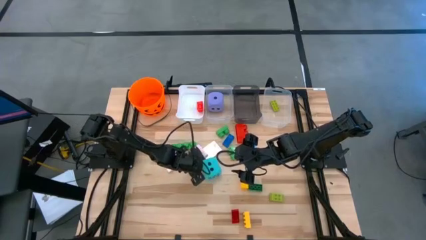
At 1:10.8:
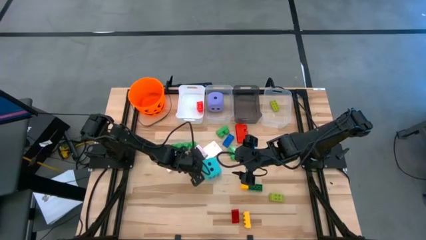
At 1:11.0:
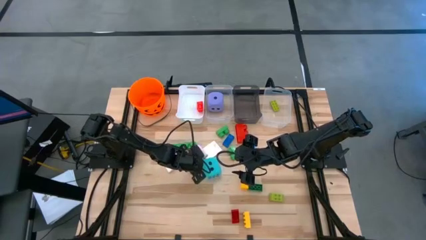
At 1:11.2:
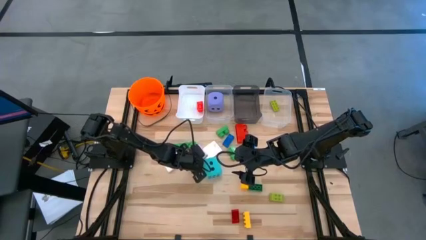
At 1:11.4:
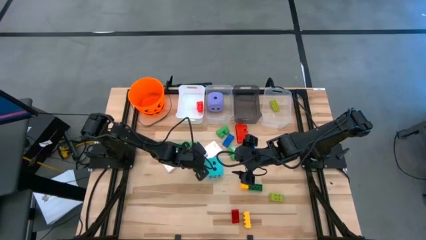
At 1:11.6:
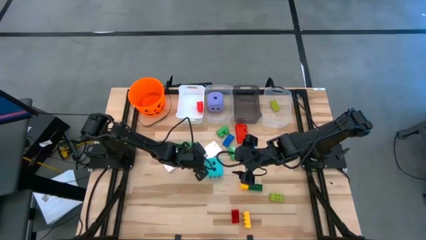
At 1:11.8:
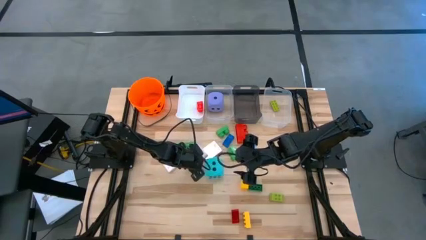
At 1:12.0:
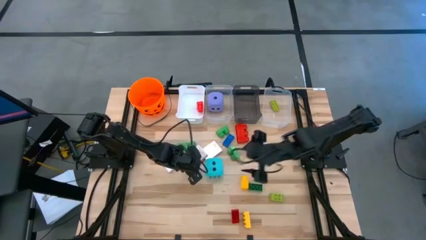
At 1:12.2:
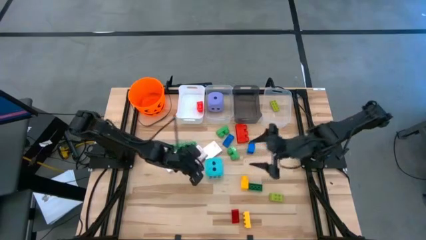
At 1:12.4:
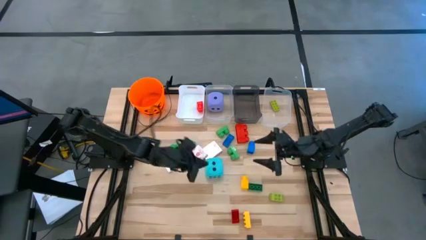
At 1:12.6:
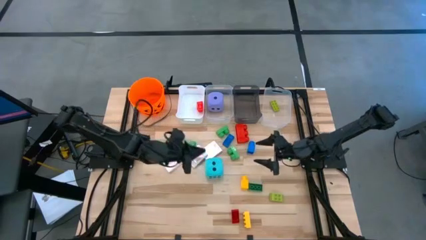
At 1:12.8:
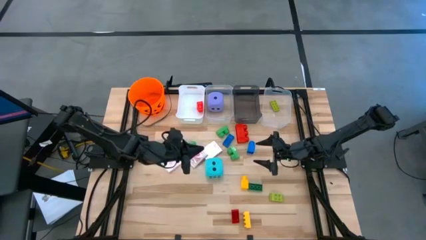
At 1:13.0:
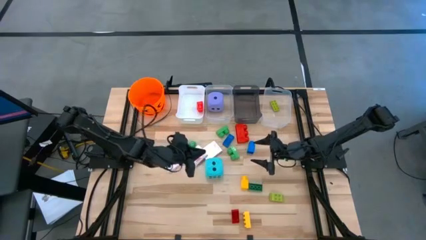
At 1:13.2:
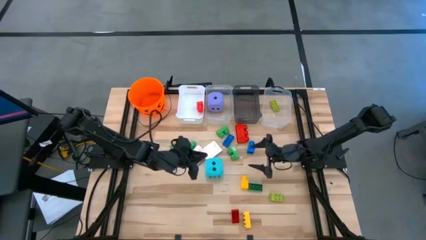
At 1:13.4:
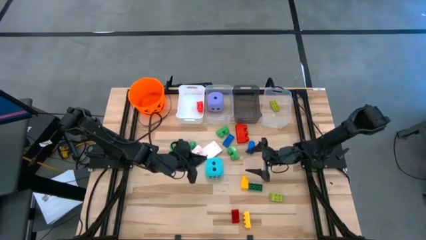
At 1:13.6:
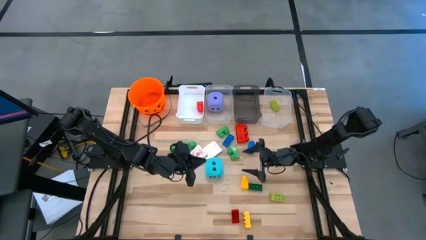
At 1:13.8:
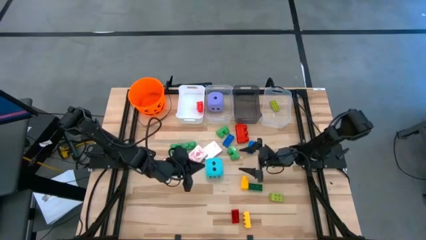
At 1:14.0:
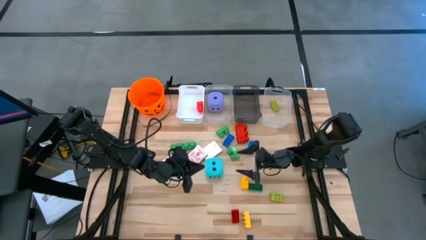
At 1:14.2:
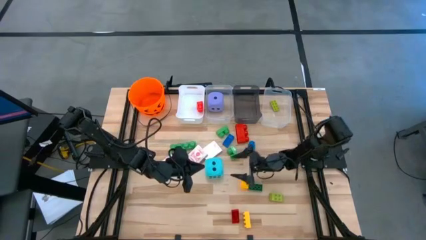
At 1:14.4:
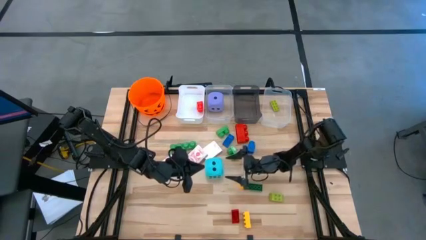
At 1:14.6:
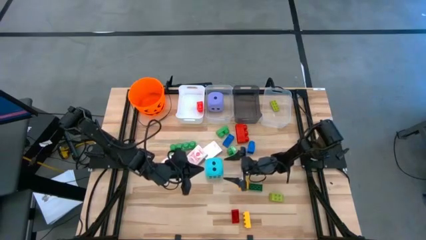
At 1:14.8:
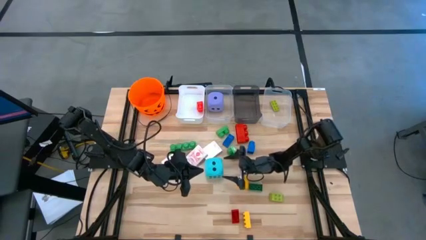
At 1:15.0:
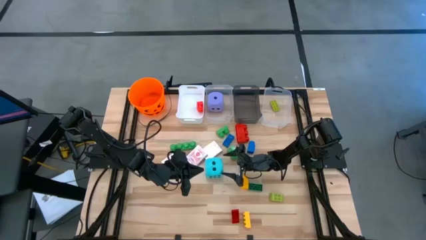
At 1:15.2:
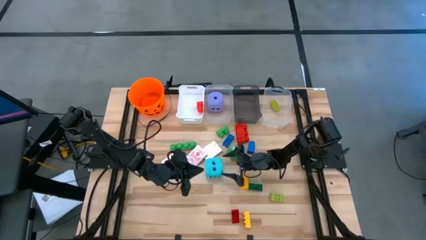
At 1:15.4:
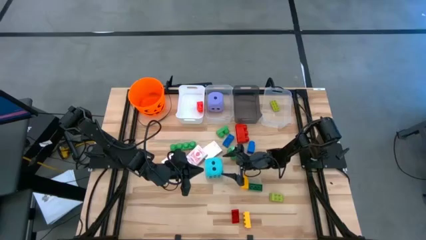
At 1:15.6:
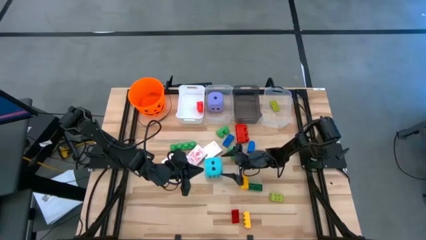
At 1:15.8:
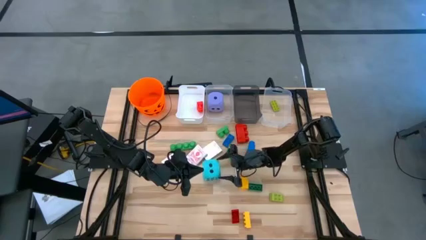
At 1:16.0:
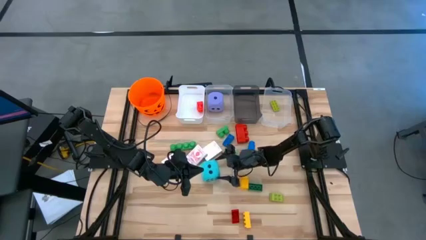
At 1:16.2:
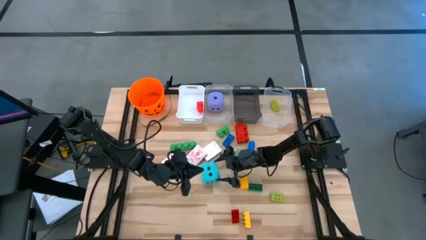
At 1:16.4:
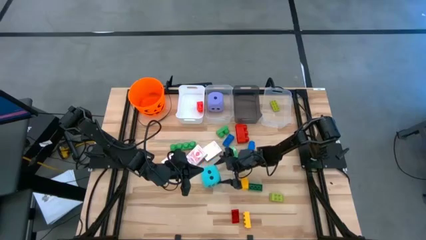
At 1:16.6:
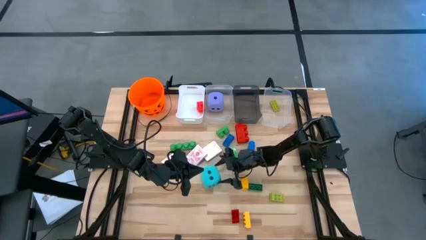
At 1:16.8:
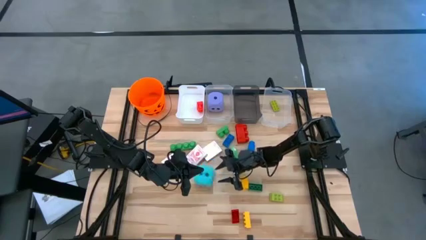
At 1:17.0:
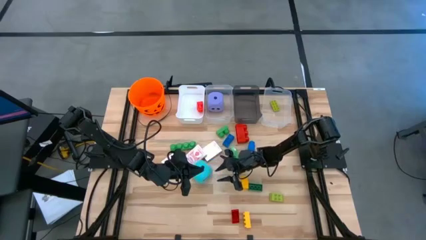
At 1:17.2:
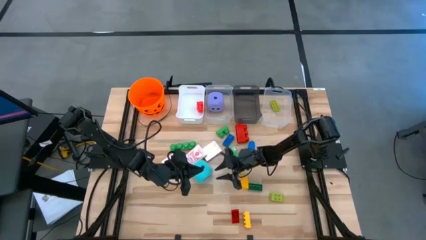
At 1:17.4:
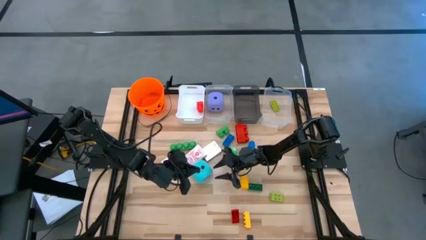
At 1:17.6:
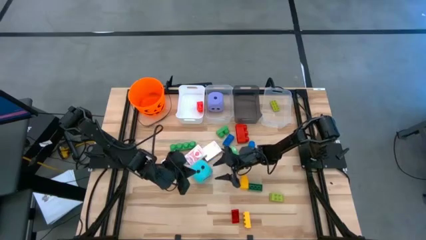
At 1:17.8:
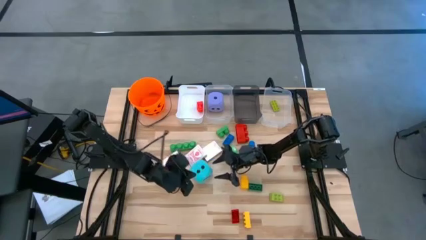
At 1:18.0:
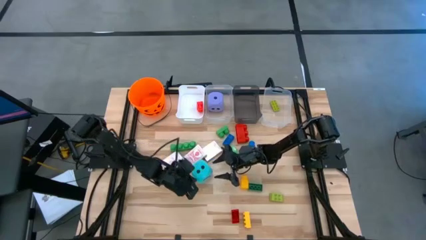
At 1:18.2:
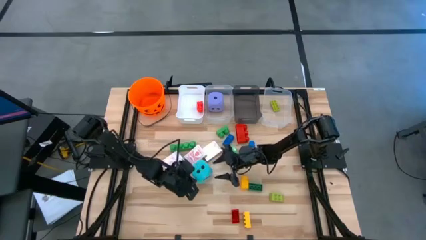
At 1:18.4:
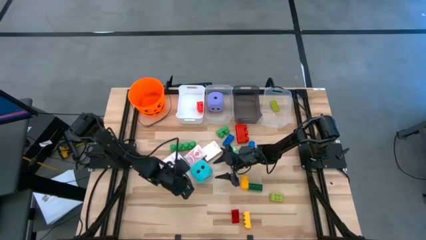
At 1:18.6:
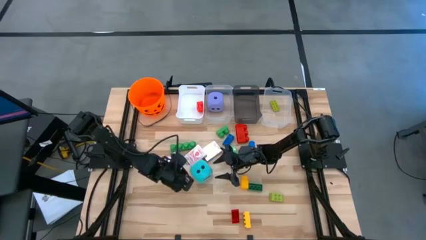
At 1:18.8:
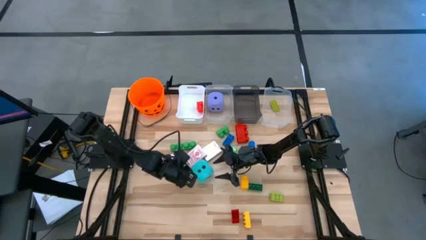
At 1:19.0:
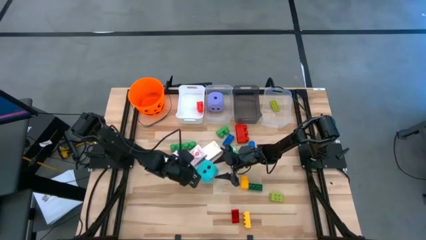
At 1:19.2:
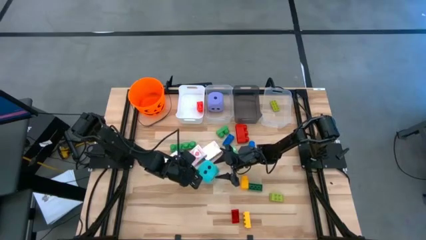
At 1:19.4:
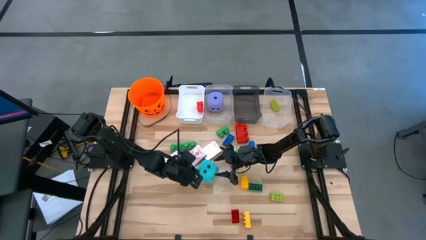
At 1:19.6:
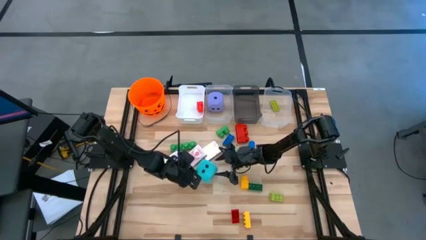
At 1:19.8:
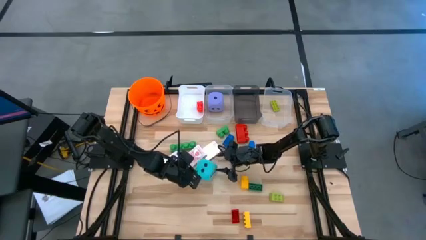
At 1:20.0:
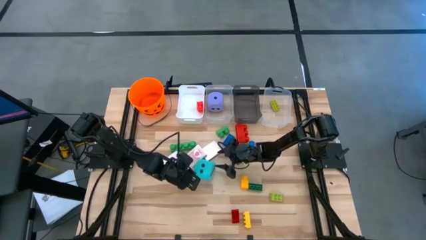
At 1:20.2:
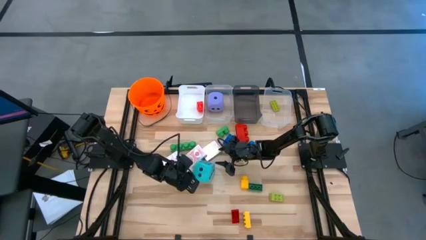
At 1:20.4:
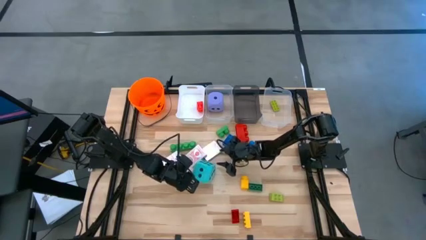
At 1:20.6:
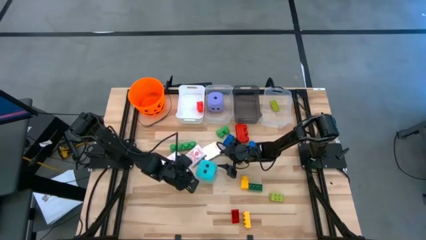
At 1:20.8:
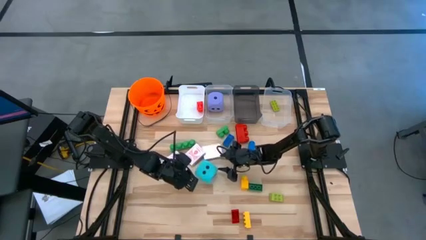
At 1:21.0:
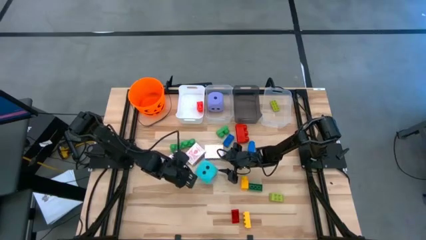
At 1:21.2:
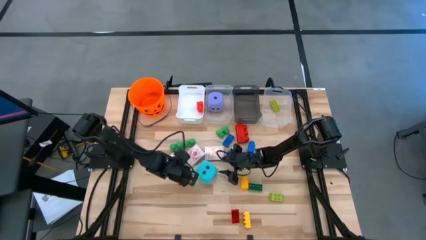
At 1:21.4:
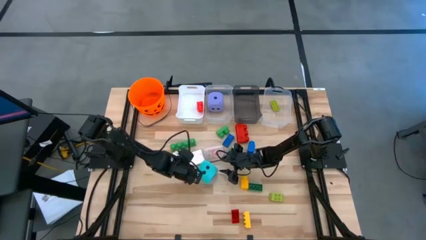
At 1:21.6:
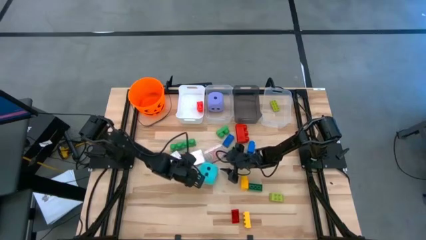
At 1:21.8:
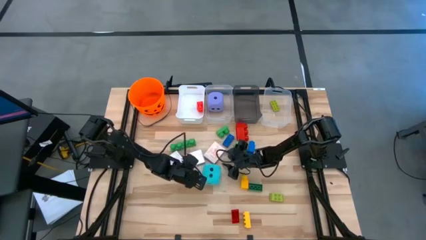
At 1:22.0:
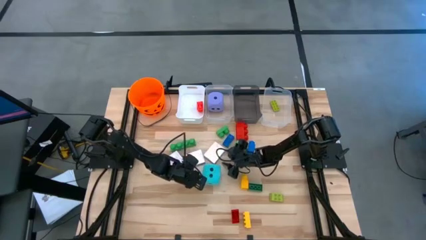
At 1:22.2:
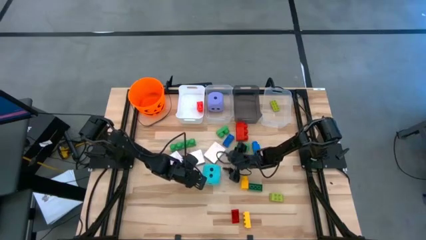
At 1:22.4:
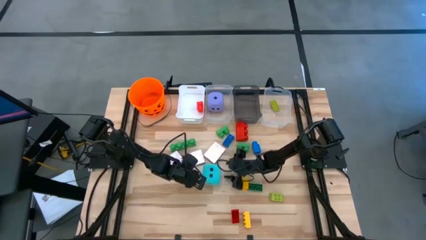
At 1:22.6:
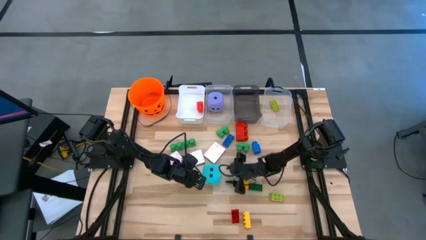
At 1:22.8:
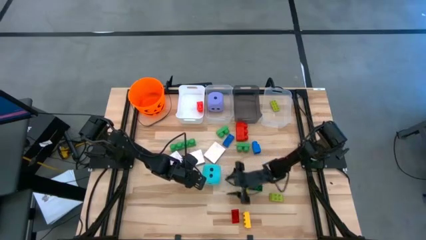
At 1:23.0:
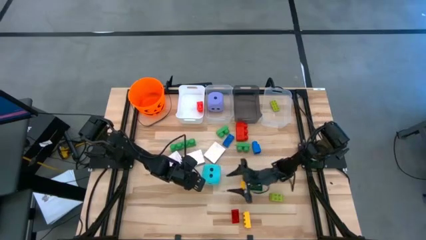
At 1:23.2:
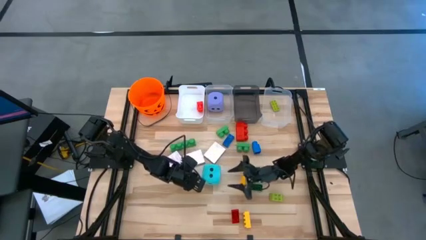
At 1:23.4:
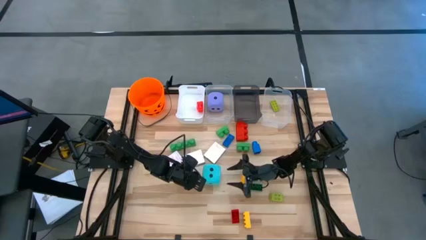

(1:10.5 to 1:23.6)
Task: Pick & Place Toys
Put the blue dice into the left transparent bin

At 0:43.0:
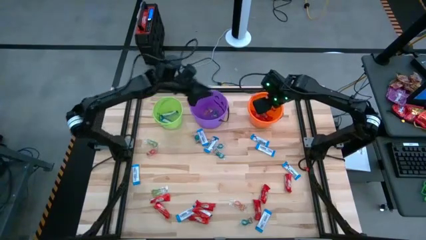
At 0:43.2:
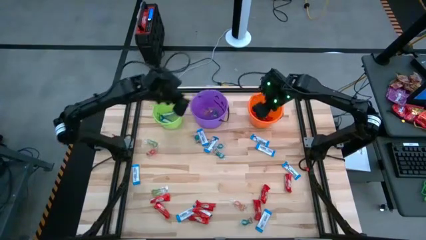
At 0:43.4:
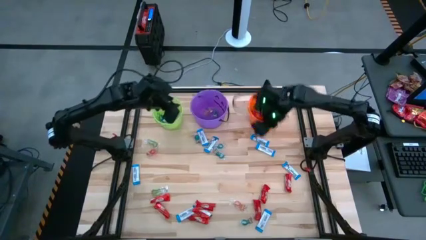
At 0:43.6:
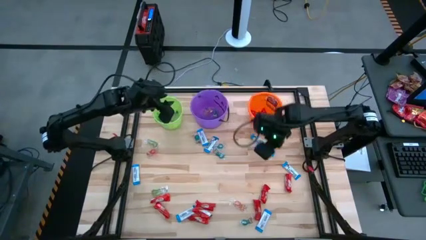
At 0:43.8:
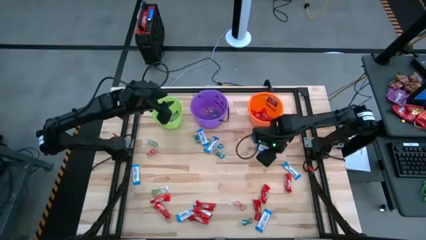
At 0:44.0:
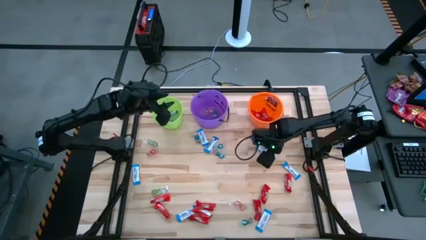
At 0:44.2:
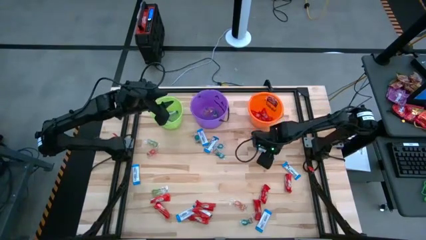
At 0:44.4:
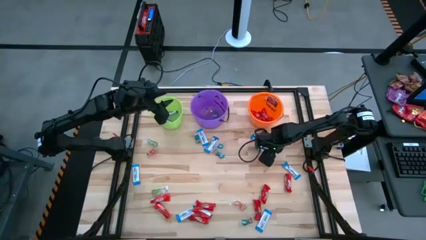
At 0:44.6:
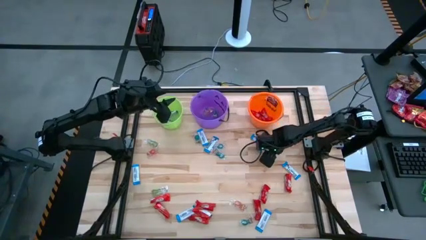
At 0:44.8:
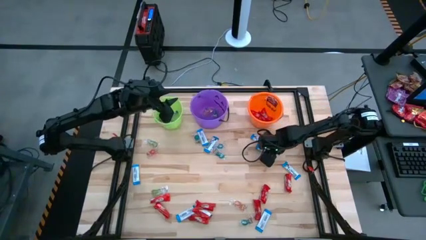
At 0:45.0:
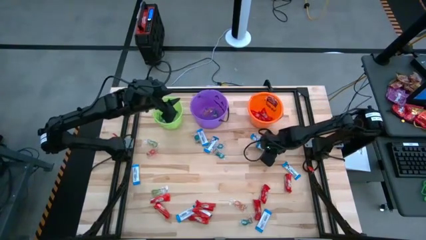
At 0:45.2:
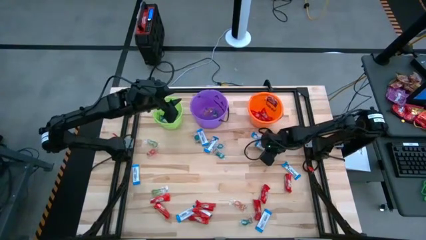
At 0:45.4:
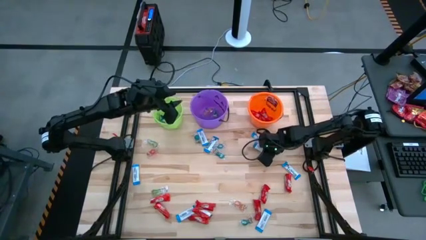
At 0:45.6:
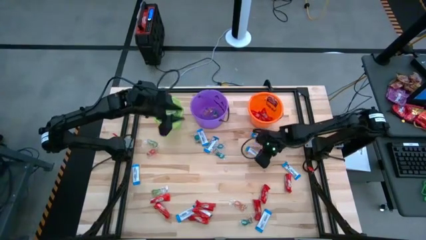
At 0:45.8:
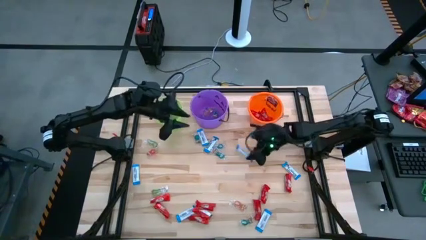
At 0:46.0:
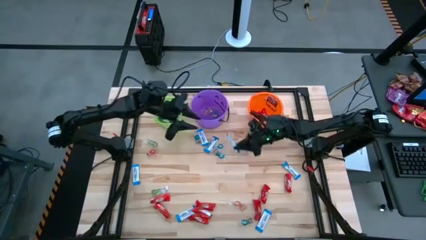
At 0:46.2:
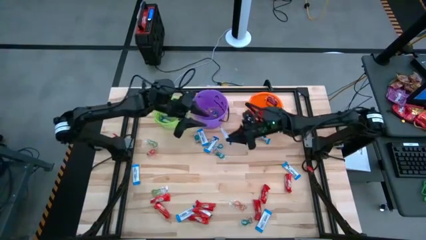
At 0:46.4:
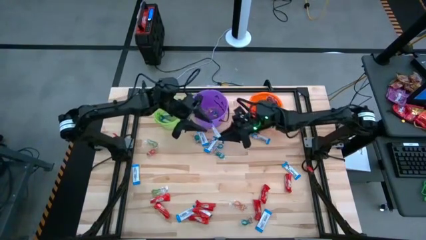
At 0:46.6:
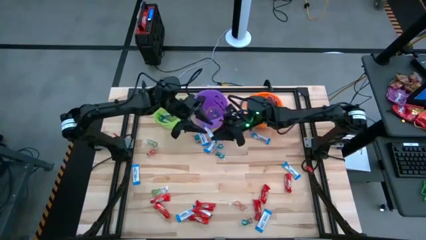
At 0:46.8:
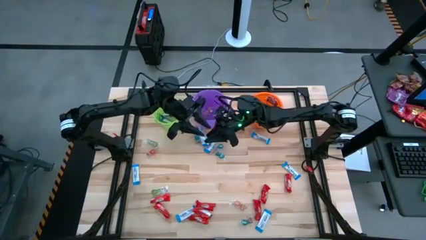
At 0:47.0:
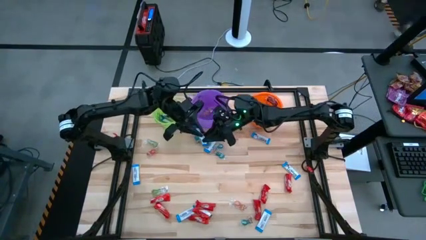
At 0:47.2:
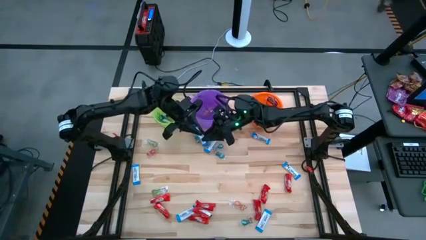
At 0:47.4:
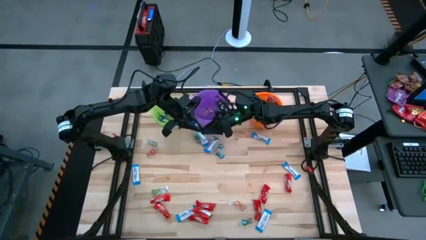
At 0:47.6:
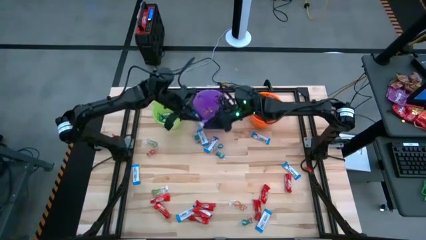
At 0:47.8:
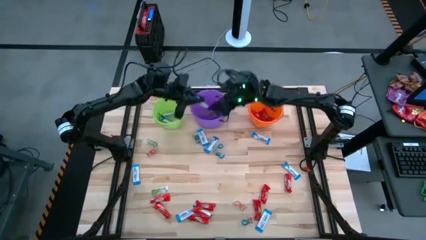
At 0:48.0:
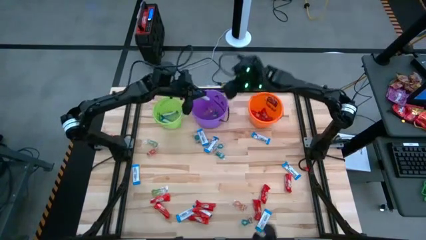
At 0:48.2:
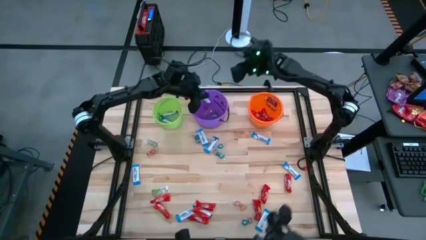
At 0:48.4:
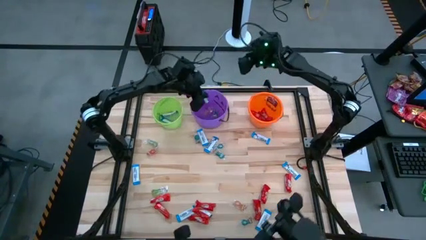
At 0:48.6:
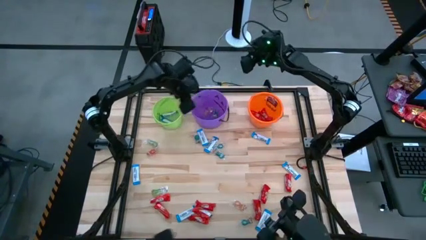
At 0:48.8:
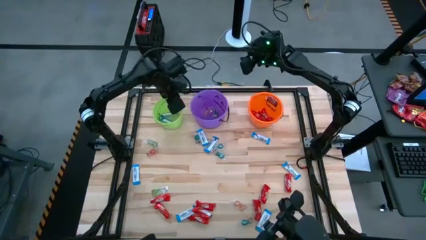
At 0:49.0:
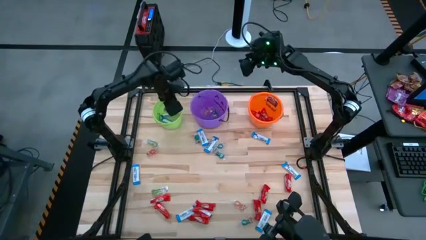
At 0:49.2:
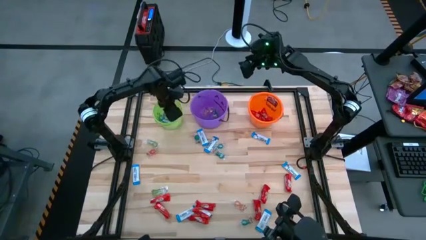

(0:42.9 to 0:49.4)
Task: Sort candy by brand, put in halloween buckets
Put the white chocolate into the green bucket
